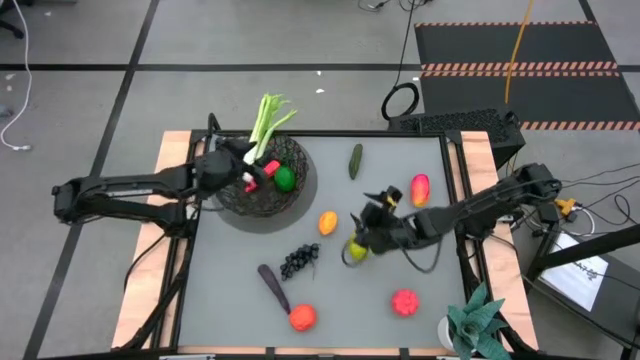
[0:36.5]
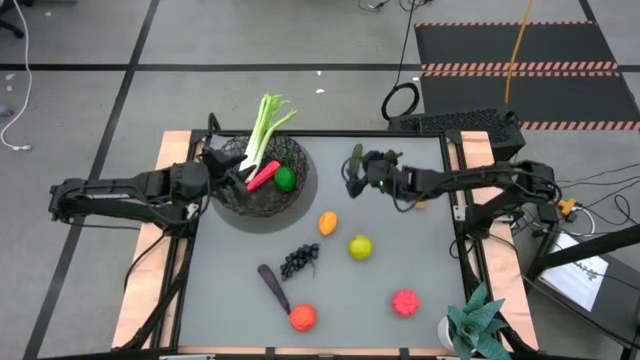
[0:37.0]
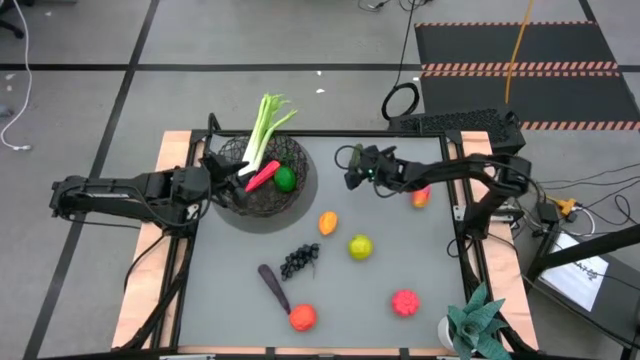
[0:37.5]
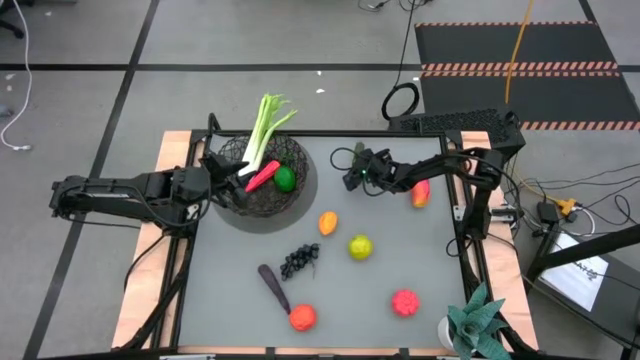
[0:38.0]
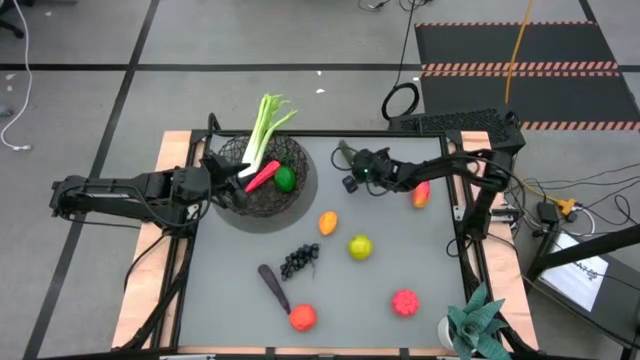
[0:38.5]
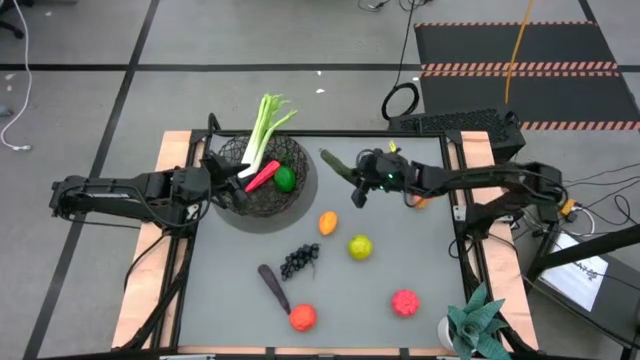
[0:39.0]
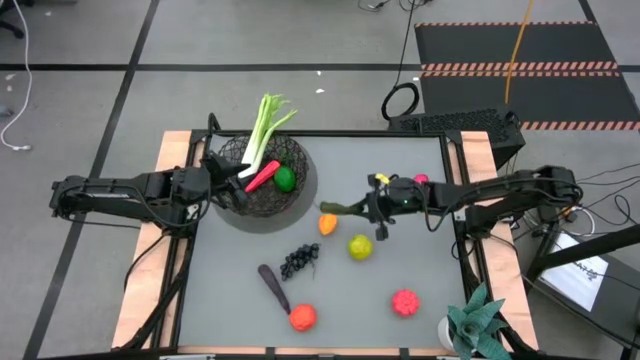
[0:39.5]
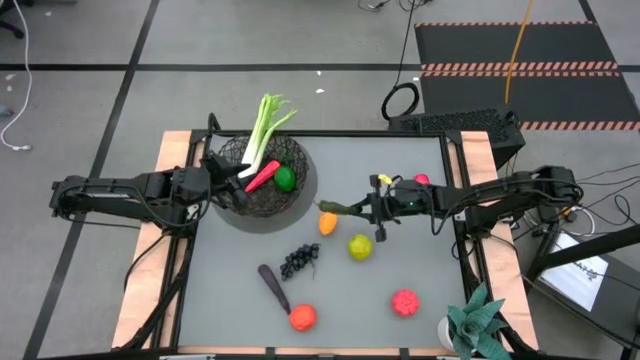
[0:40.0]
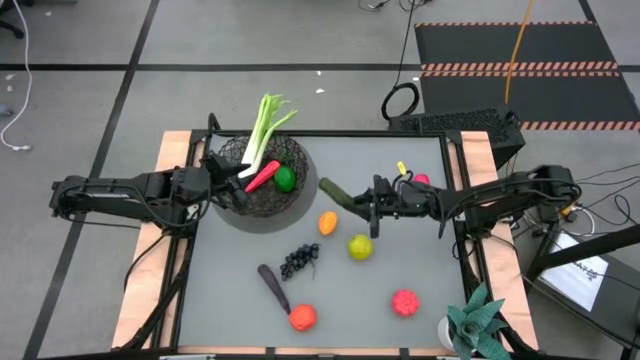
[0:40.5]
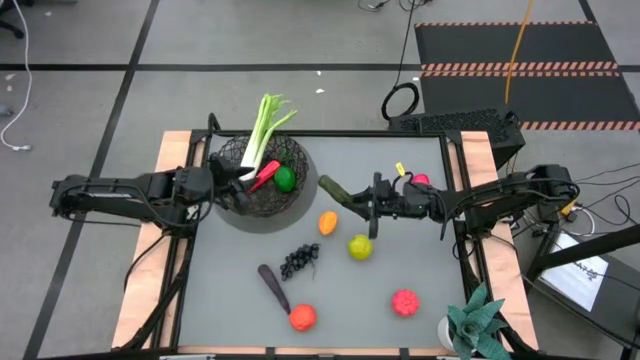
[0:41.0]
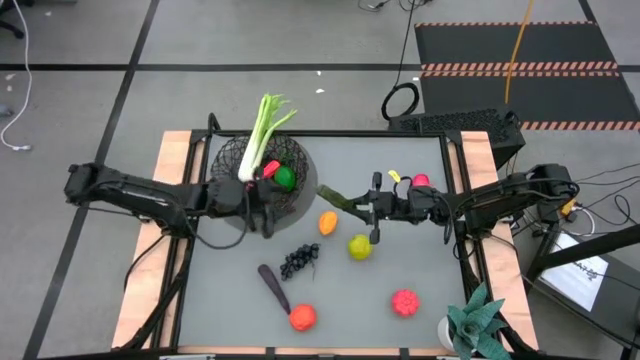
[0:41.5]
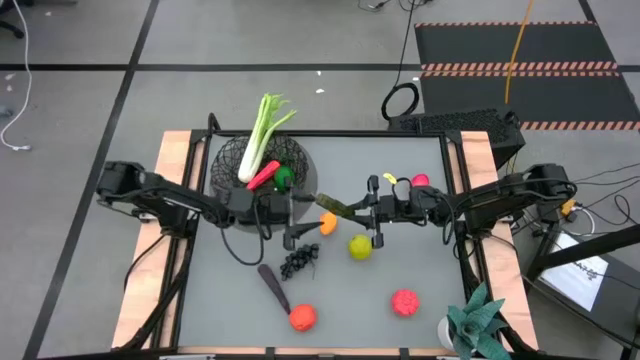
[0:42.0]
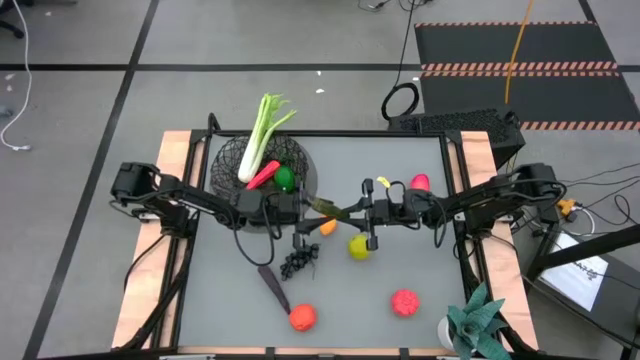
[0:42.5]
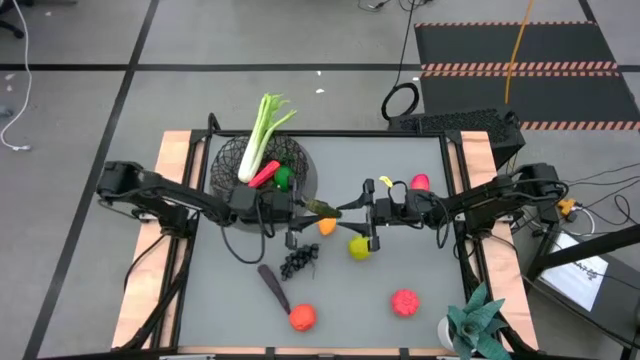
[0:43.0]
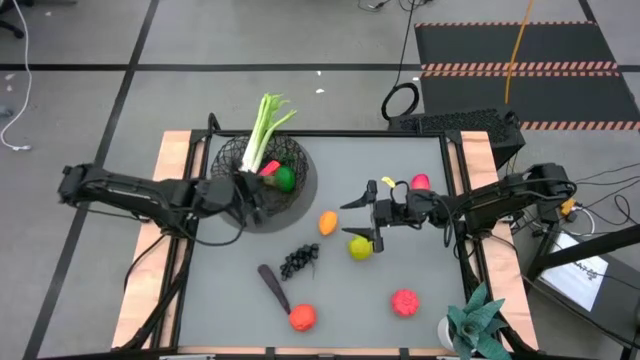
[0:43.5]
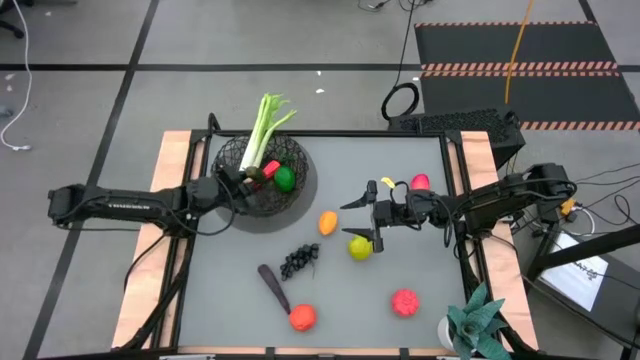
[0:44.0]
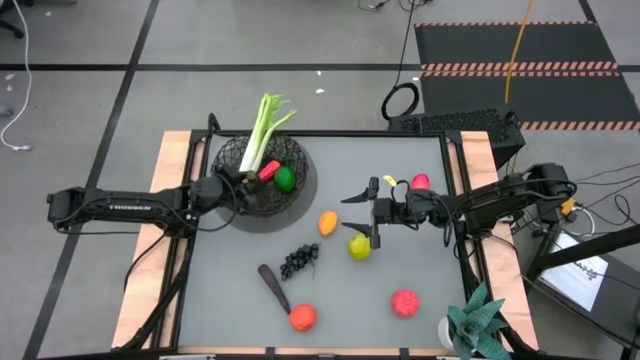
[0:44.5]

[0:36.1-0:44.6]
Task: Build produce basket
Put the green chilli into the wire basket

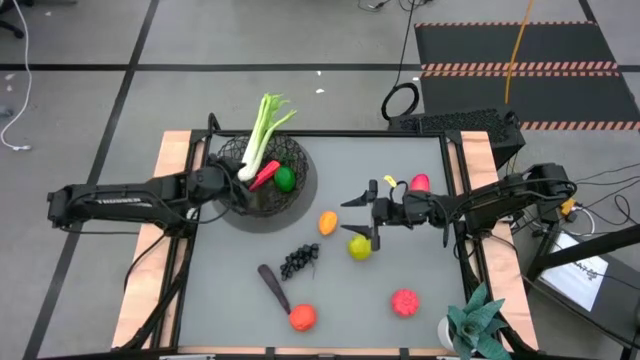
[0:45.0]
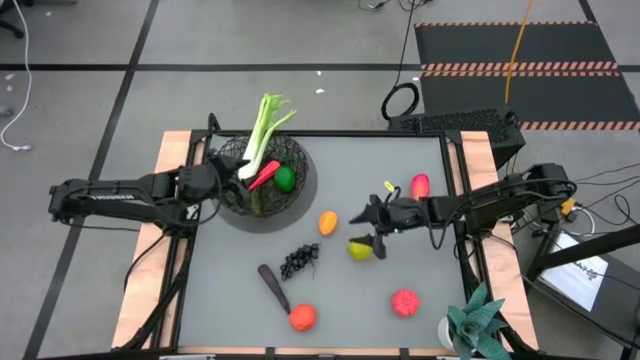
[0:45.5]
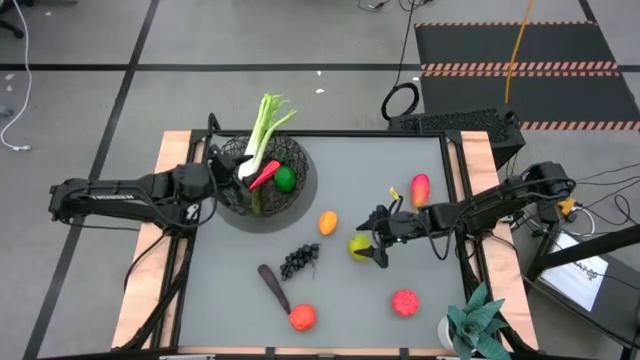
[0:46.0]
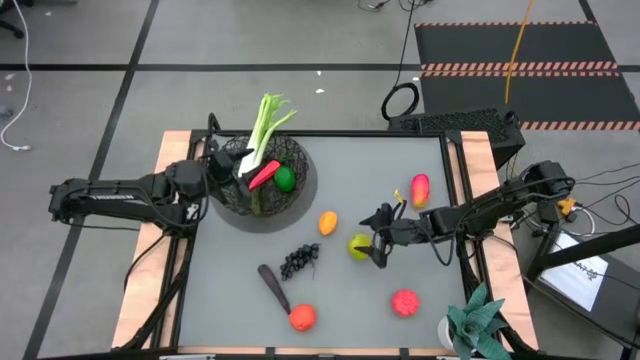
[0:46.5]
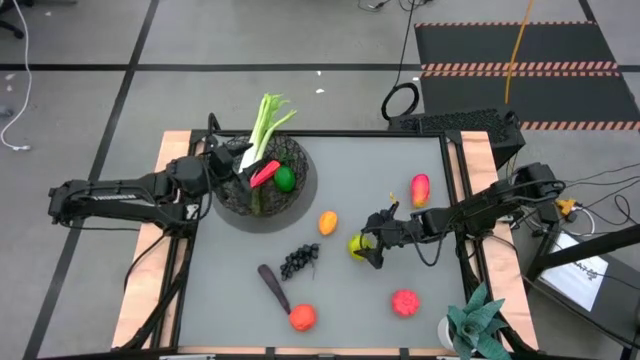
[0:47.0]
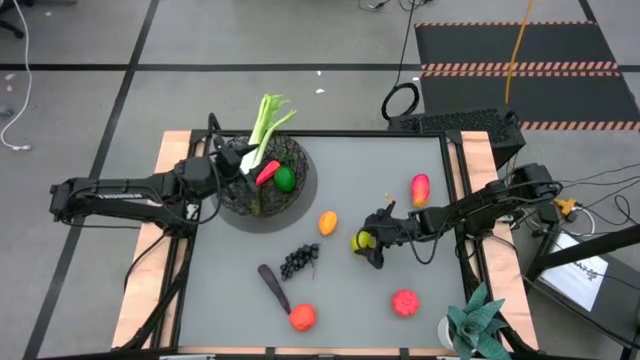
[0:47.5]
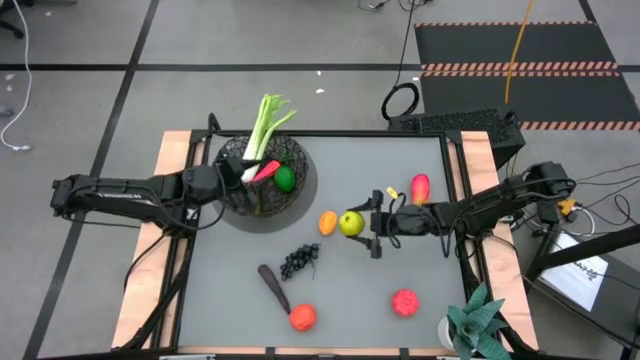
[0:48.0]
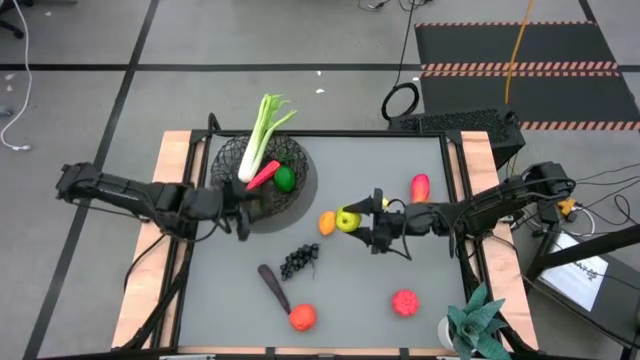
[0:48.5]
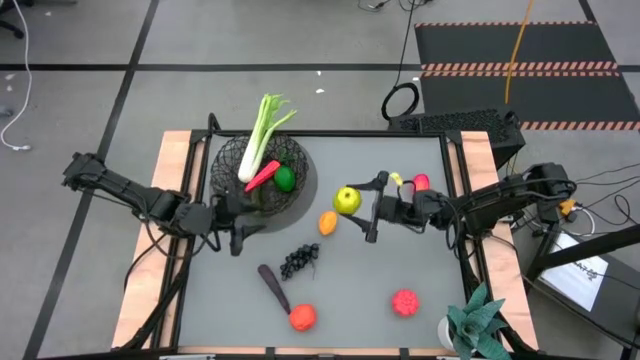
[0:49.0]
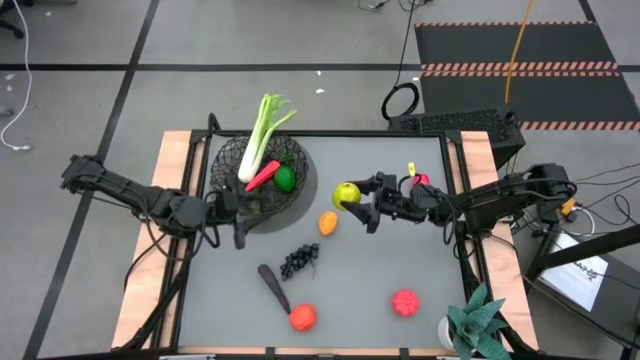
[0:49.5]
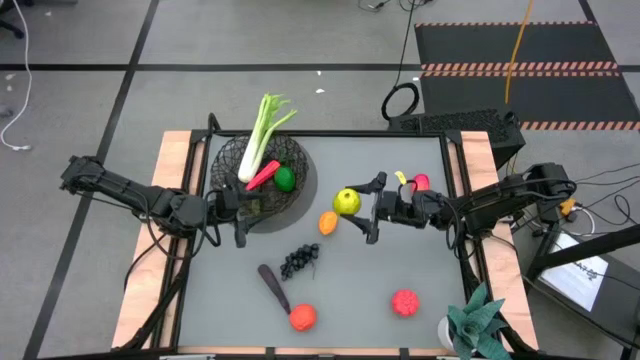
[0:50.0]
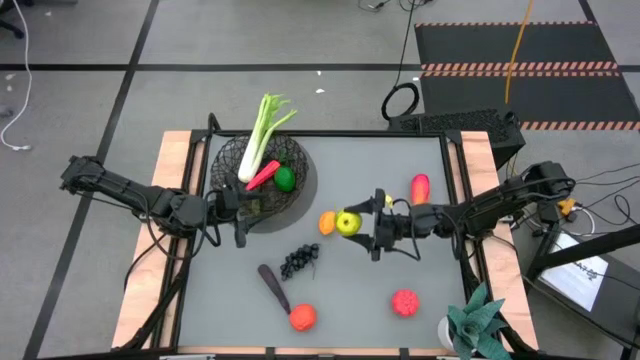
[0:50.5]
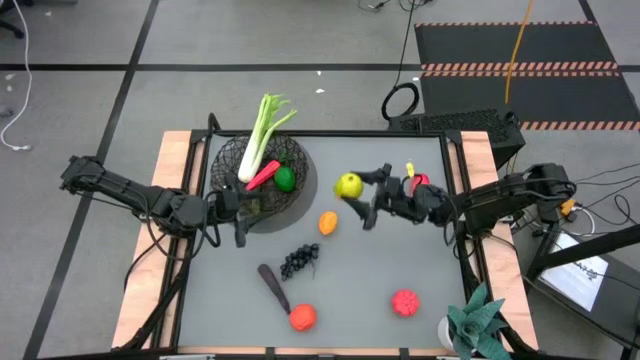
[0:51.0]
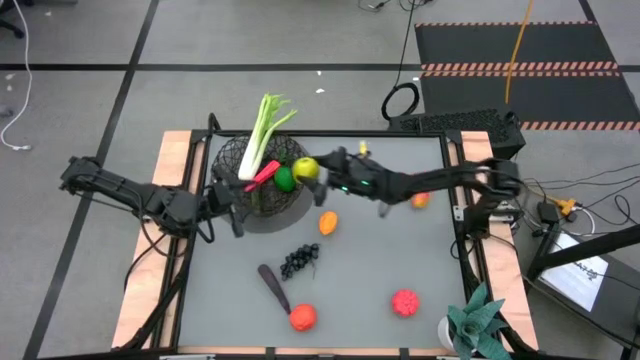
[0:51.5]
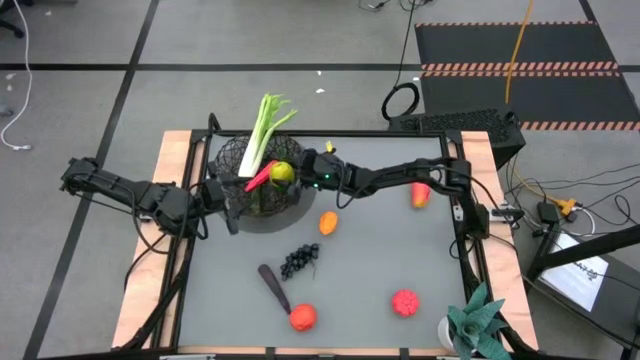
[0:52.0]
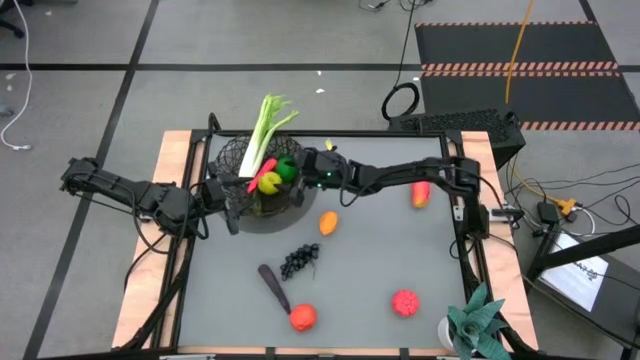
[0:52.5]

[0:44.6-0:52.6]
Put the green apple into the wire basket

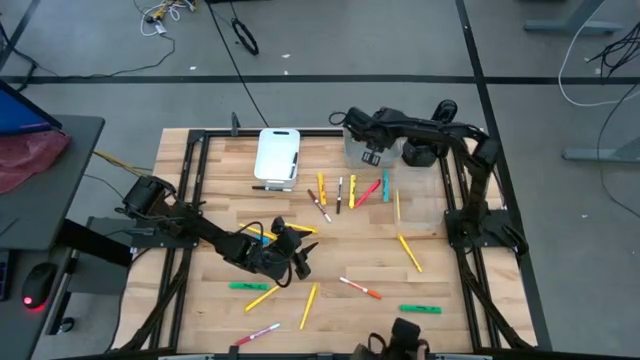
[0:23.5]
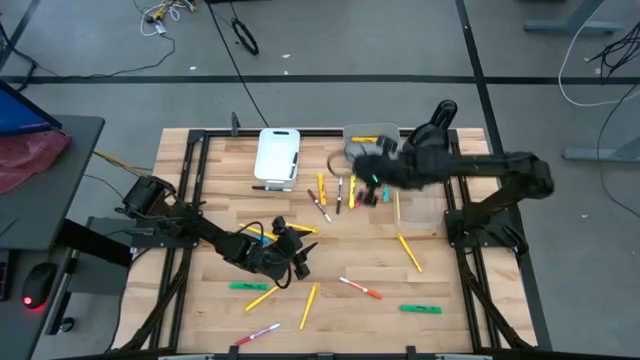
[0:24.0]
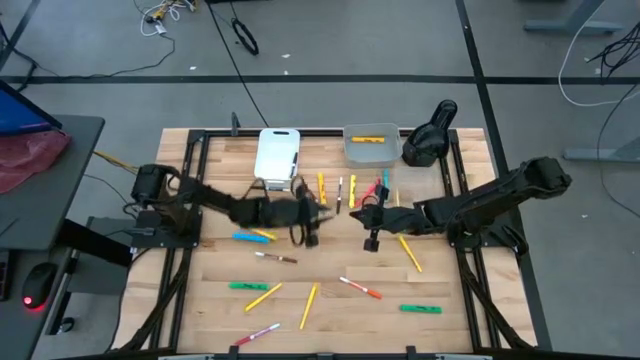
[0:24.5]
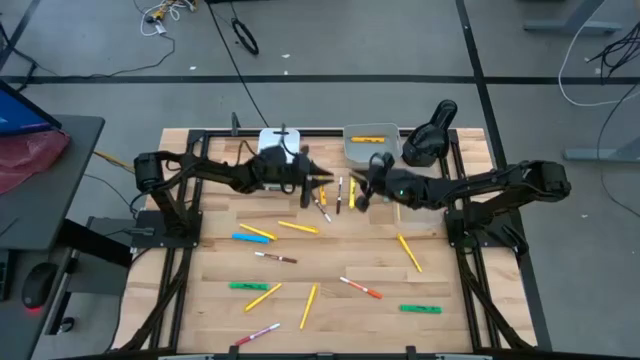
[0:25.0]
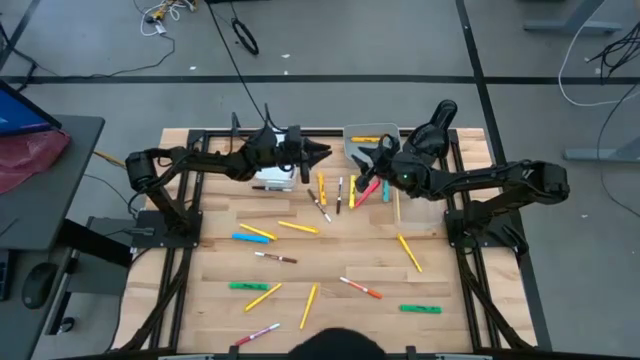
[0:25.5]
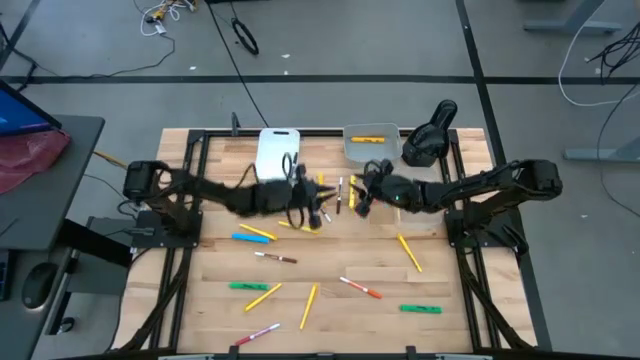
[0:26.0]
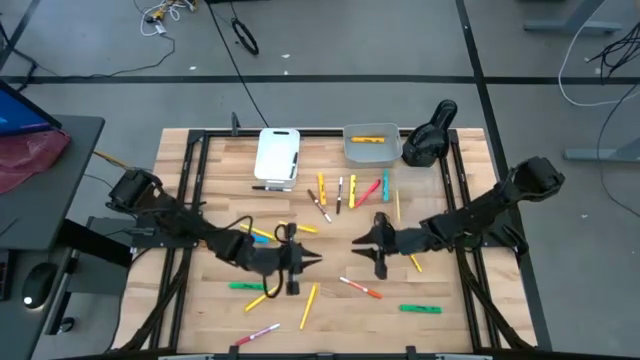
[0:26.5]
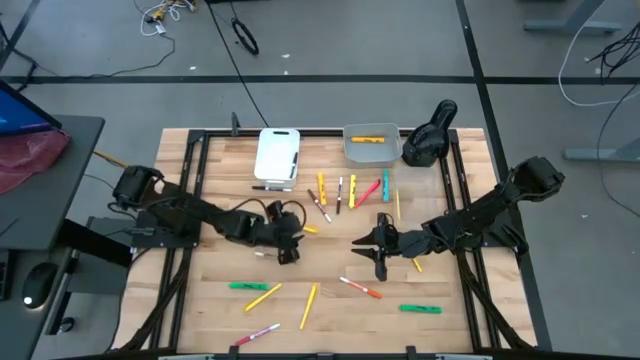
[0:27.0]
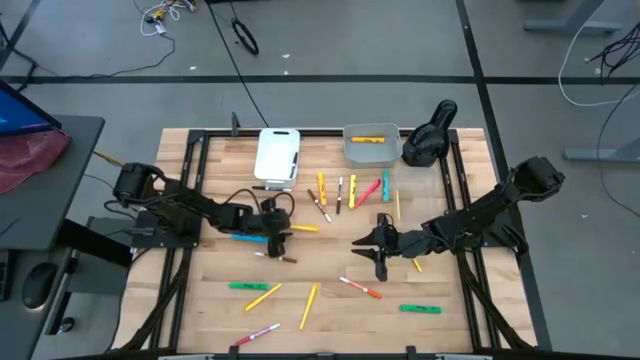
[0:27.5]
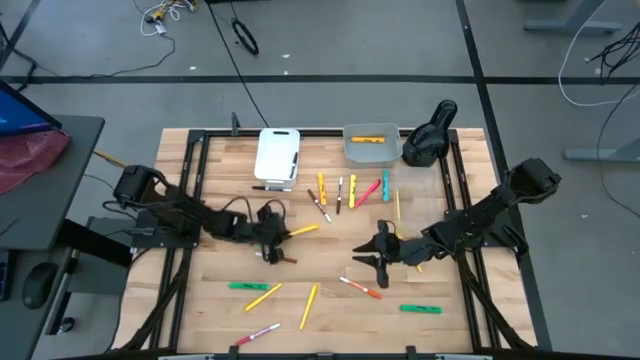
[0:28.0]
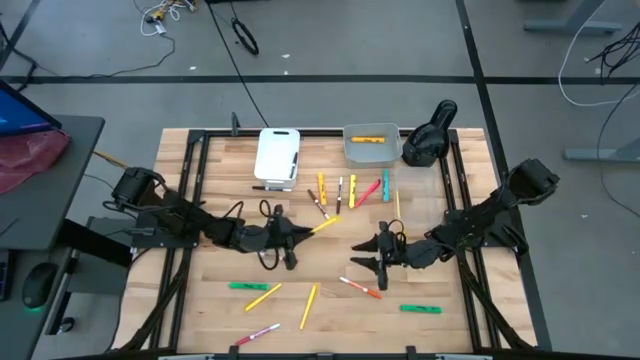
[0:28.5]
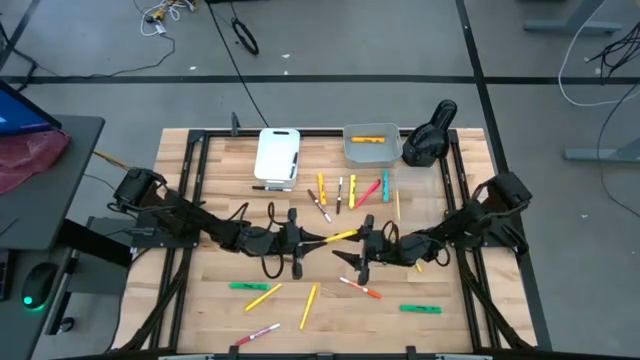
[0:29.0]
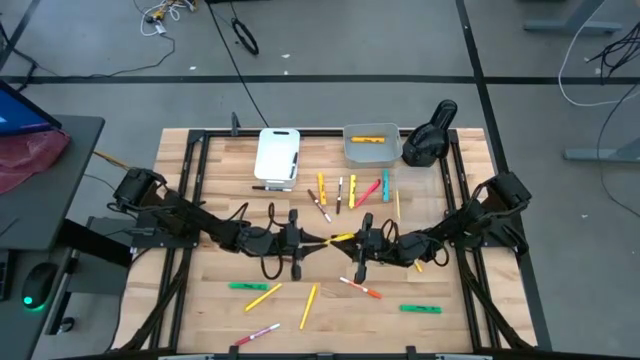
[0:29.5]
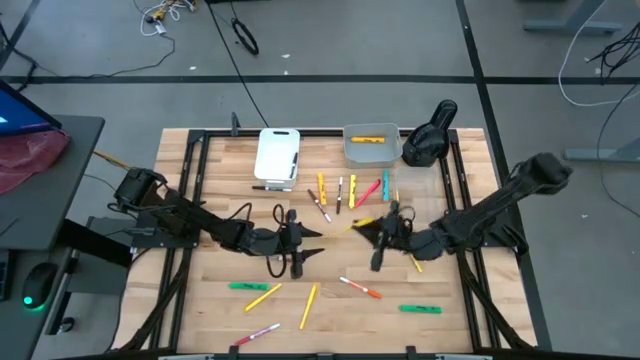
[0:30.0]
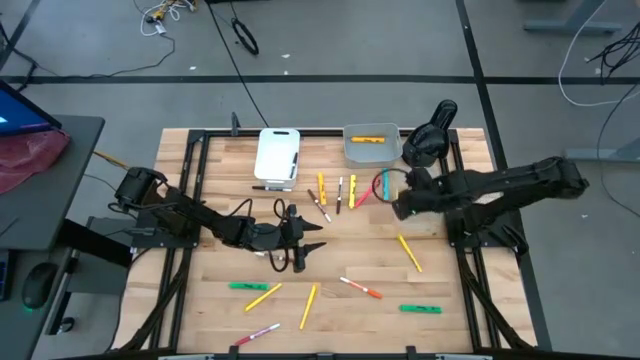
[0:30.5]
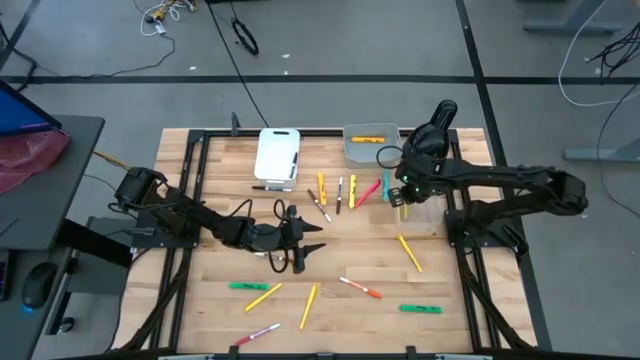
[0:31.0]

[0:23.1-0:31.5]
Task: Pick & Place Markers
Put the yellow pen into the transparent bin
